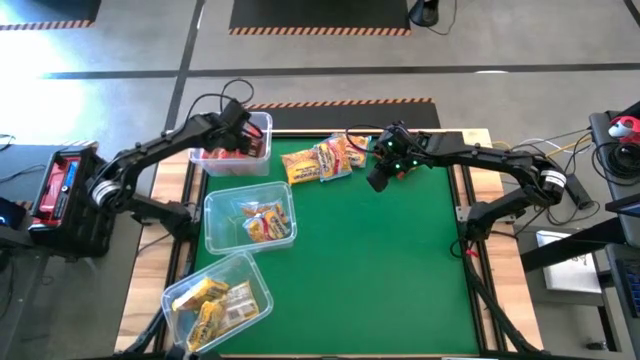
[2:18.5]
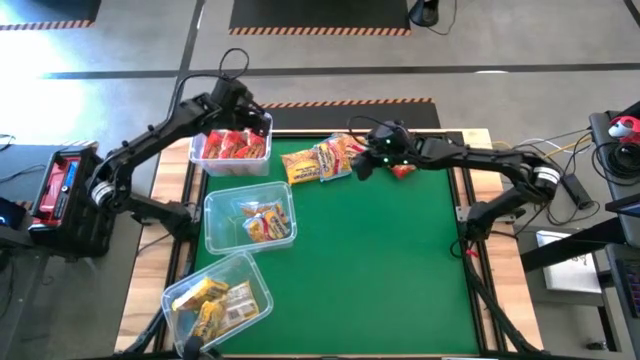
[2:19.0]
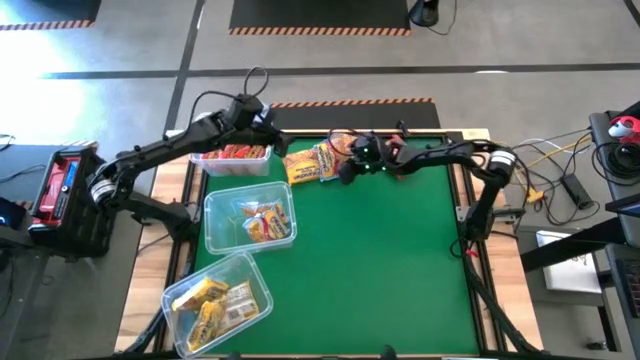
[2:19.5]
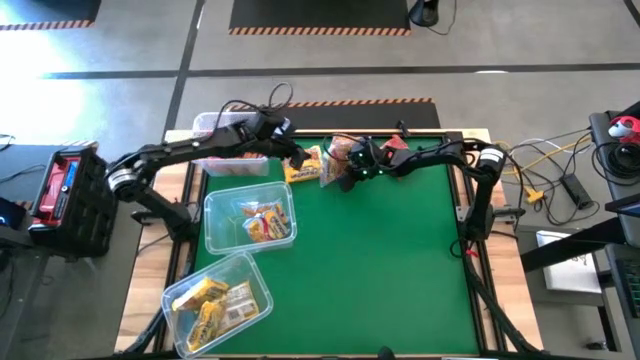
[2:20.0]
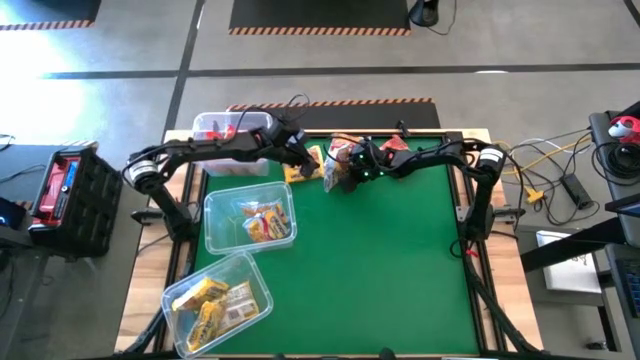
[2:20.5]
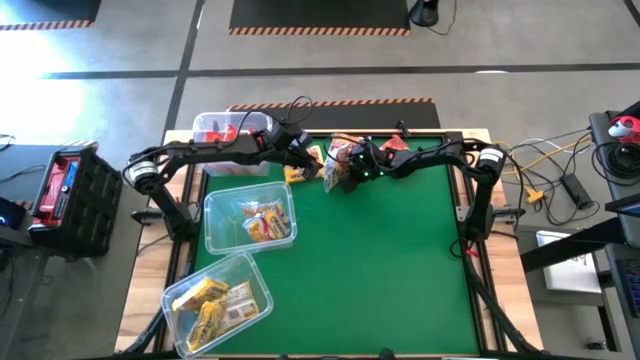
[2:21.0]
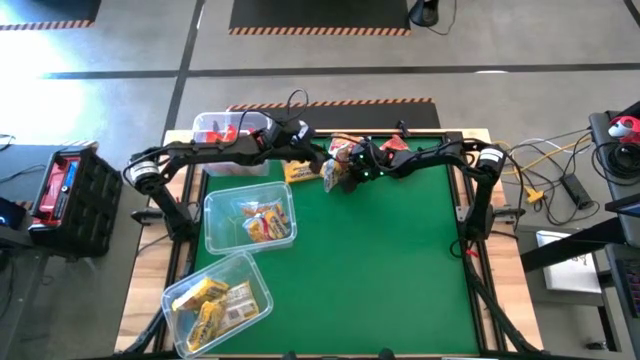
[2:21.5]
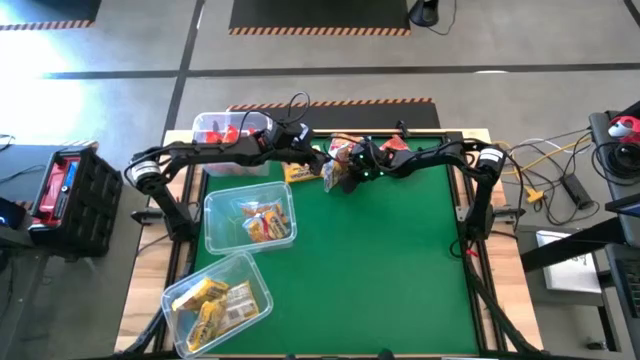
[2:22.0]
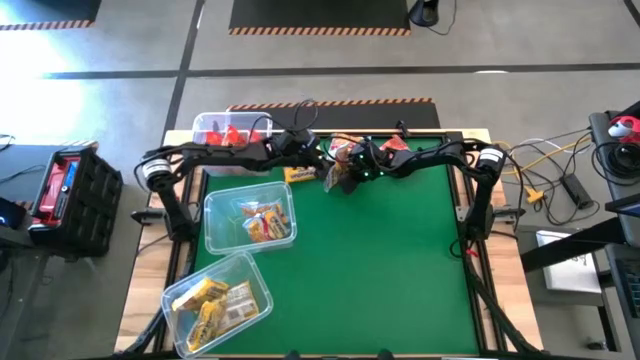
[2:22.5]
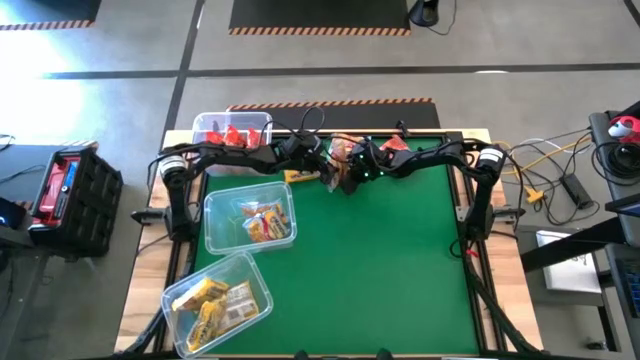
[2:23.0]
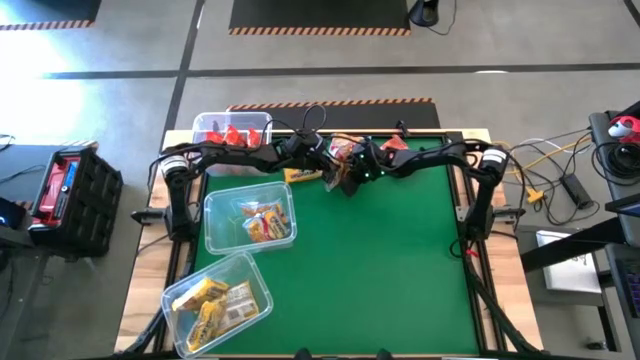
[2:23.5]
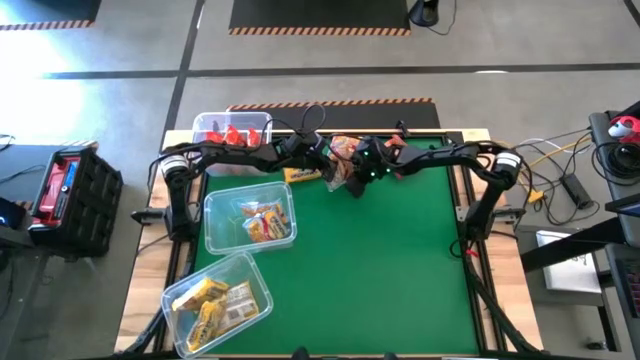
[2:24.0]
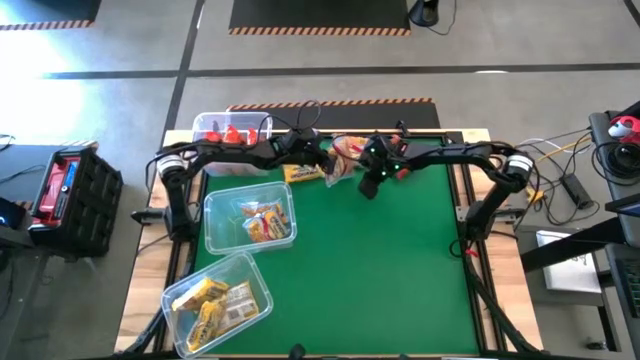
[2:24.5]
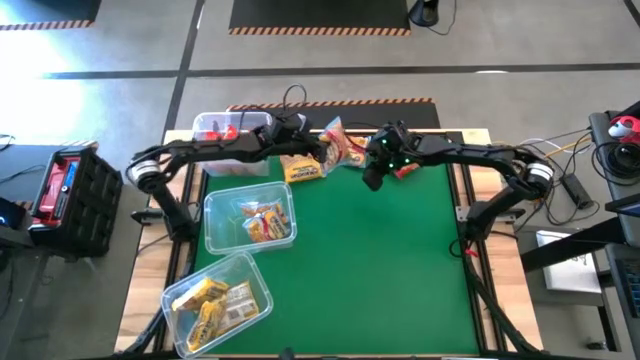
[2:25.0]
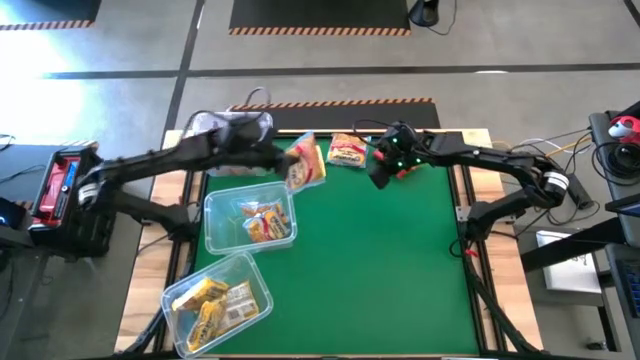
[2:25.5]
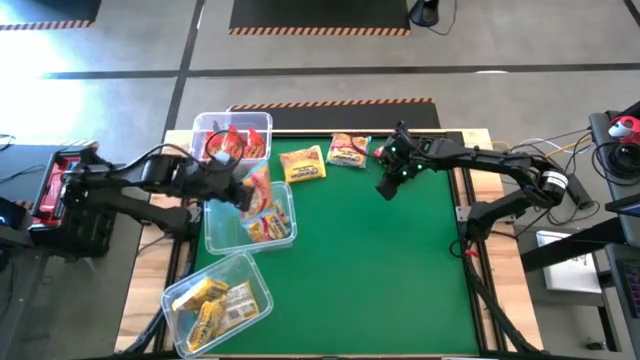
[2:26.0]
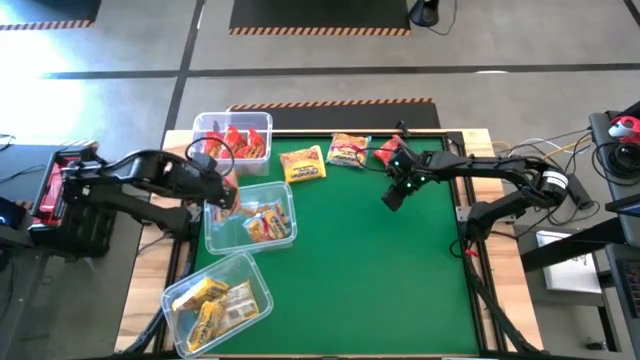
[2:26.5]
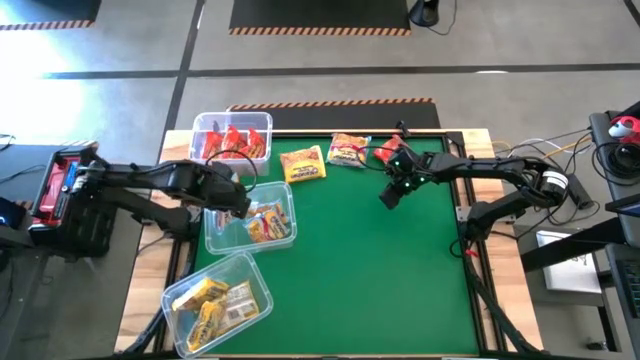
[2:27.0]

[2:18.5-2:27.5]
Task: Sort Maruchan noodles
Put the left blue noodle pack into the middle transparent bin

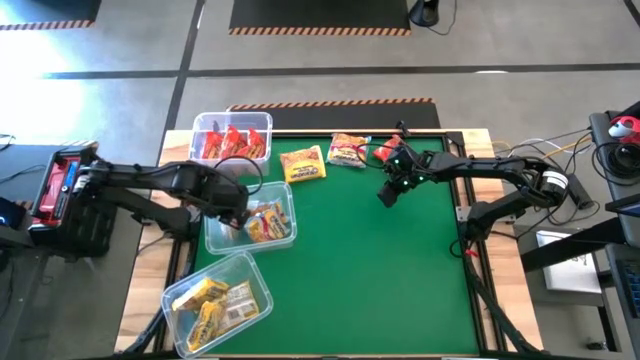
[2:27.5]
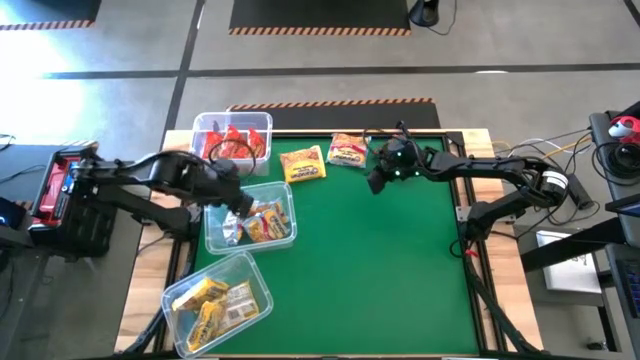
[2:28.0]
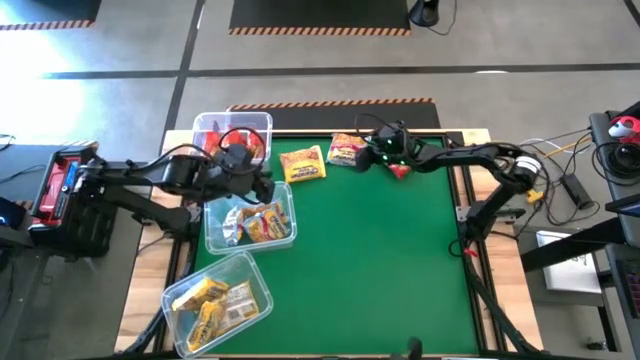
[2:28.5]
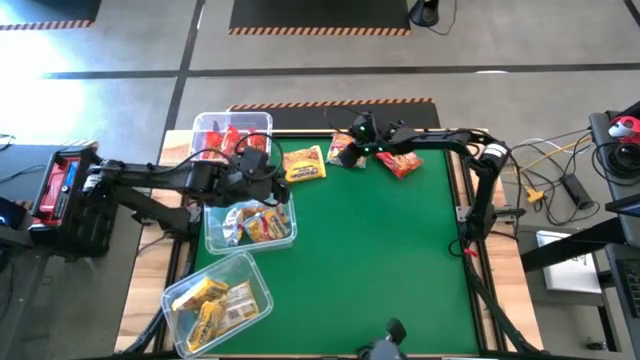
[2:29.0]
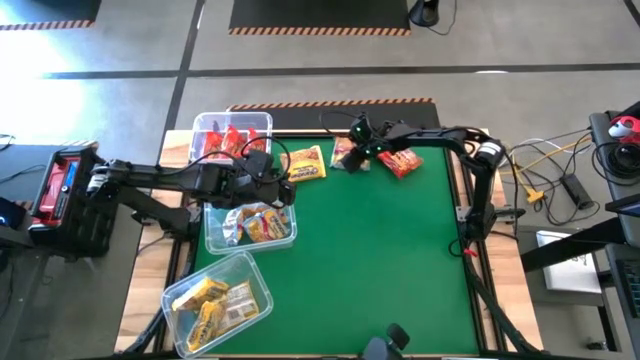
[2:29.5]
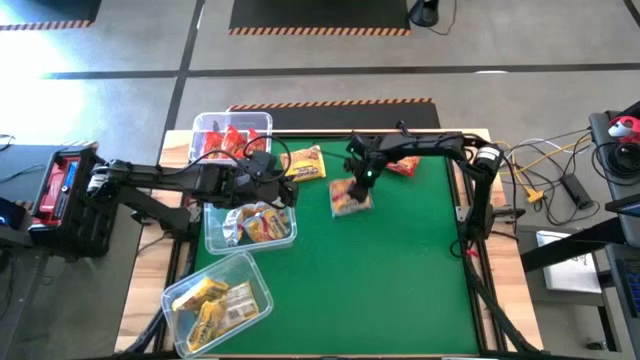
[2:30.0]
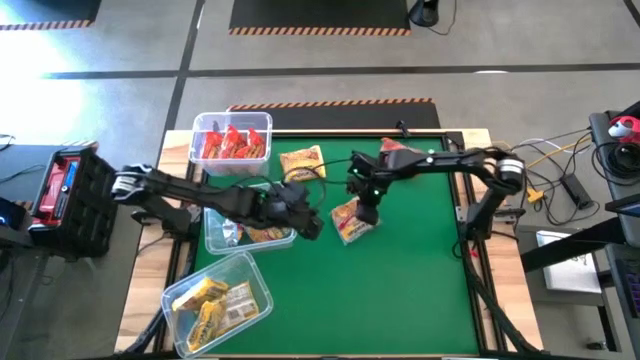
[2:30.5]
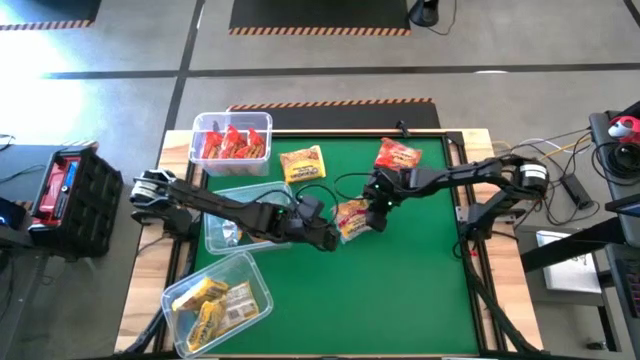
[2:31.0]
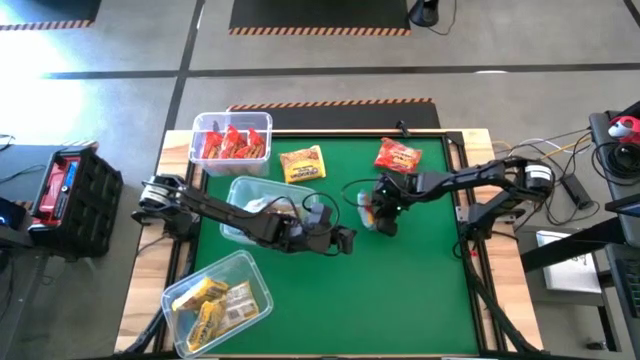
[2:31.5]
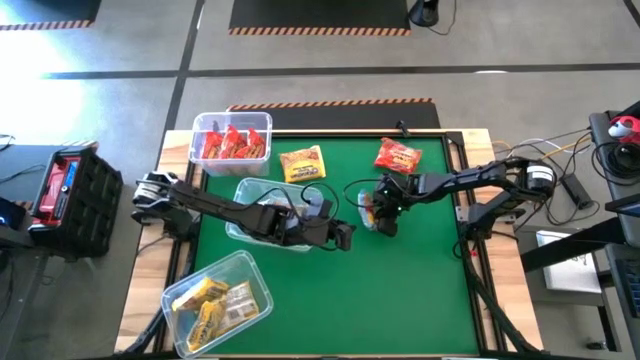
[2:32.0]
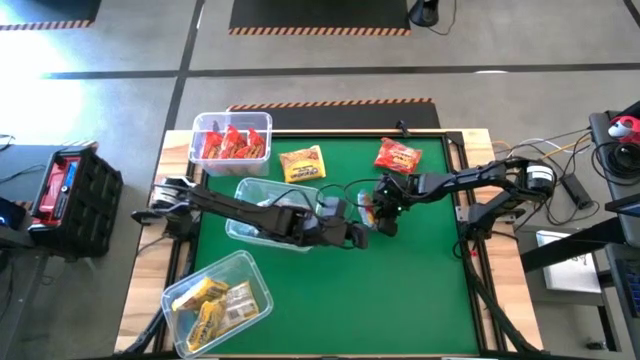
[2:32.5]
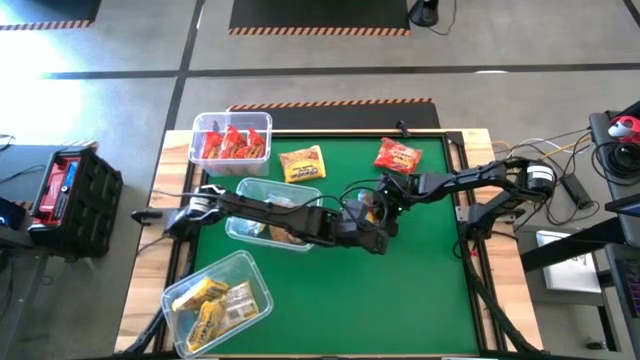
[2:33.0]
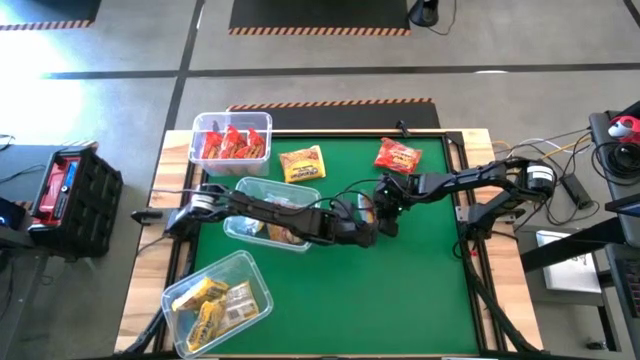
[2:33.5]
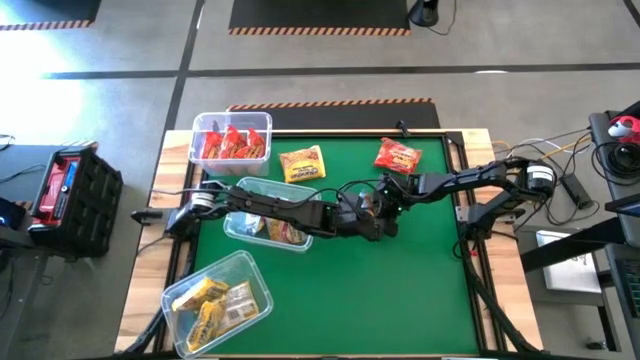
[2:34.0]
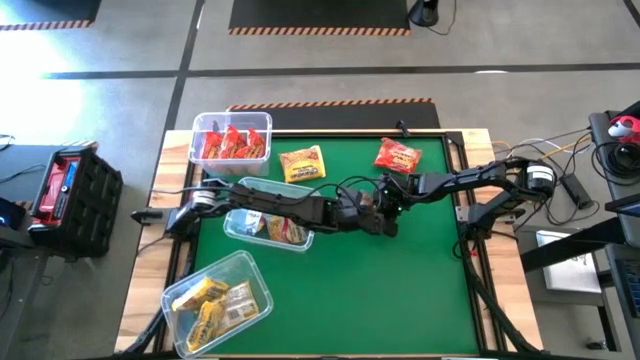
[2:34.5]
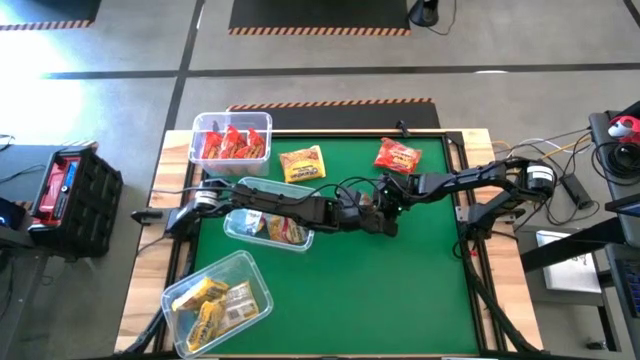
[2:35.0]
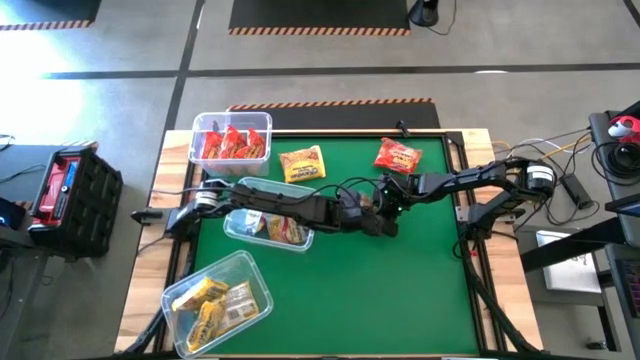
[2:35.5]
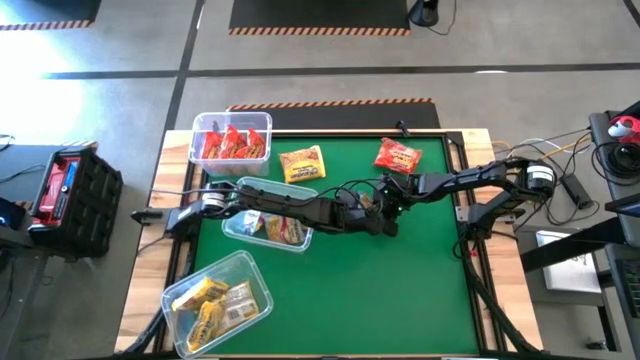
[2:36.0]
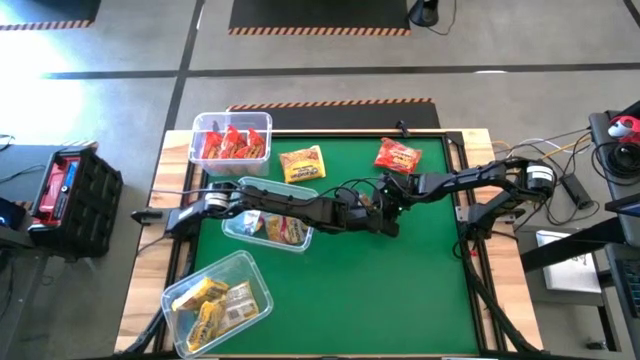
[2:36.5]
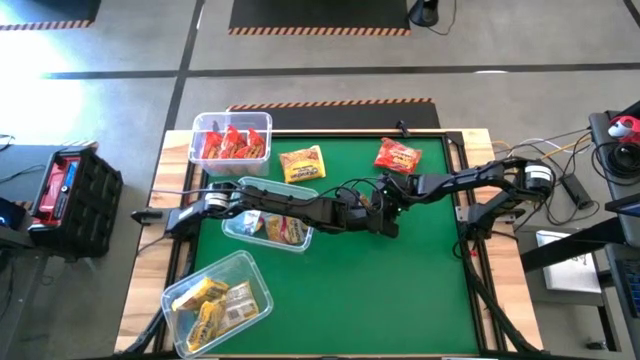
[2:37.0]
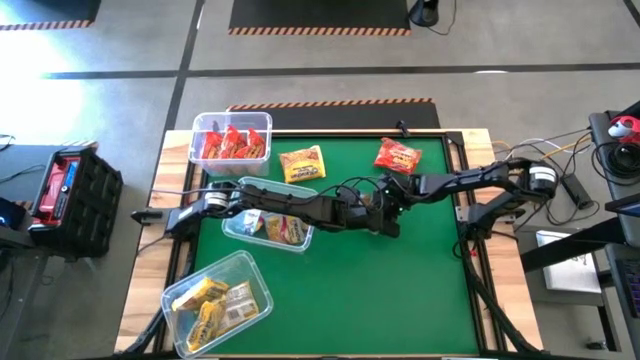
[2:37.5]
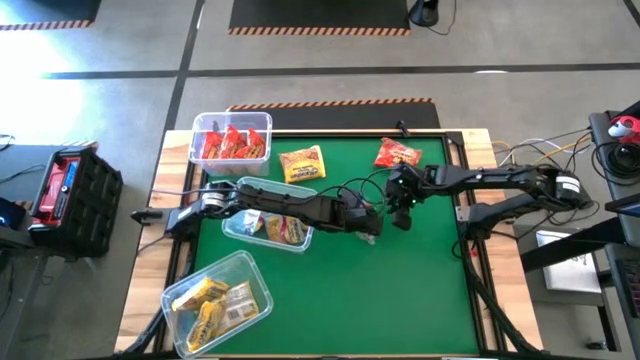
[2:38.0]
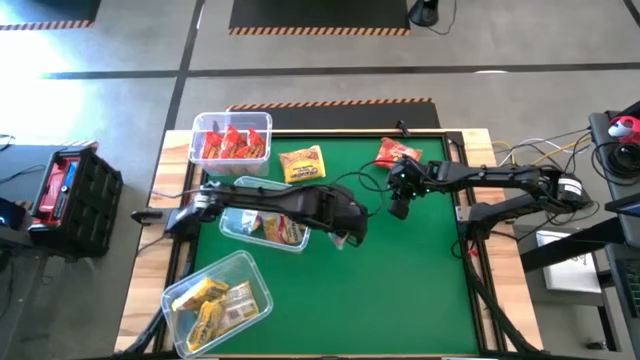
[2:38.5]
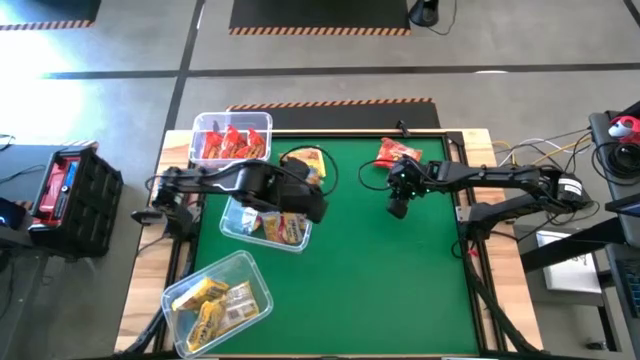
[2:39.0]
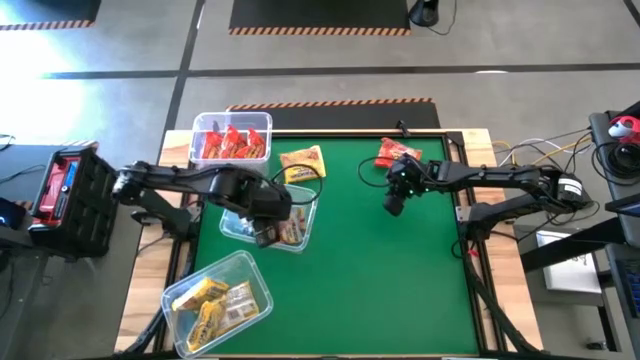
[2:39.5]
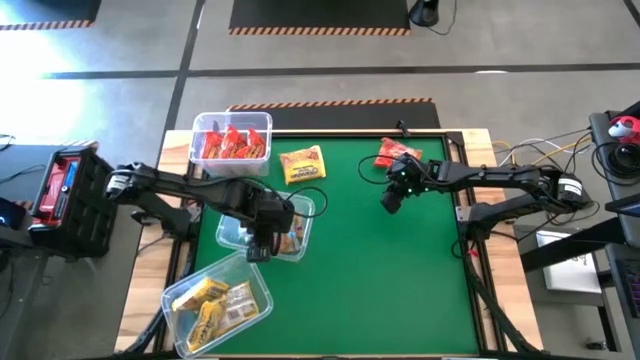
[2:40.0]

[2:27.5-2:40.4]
Put the blue noodle pack into the middle transparent bin

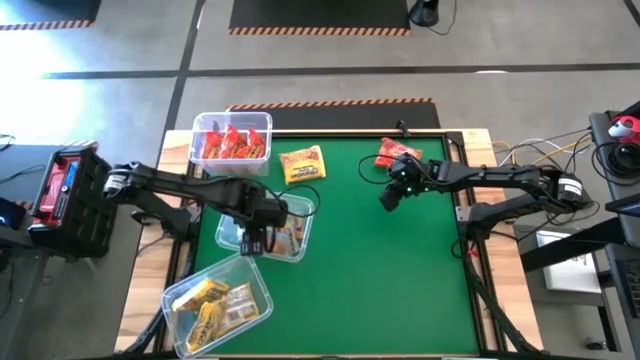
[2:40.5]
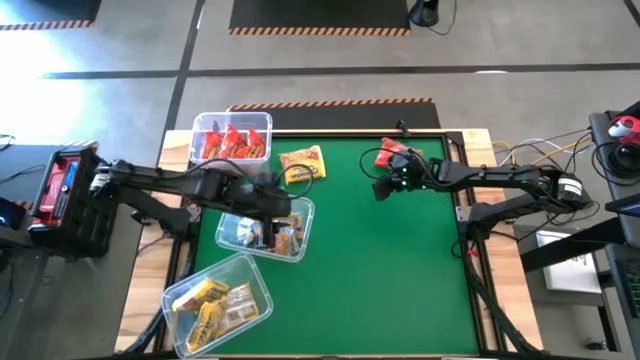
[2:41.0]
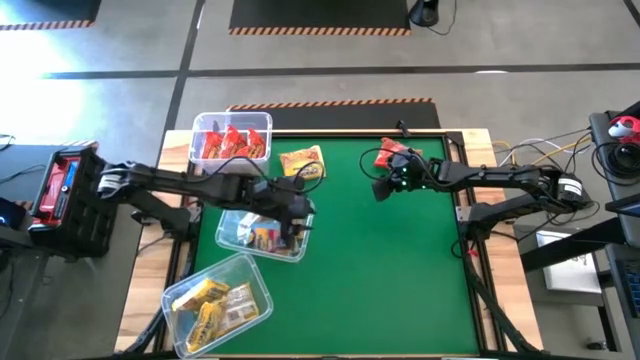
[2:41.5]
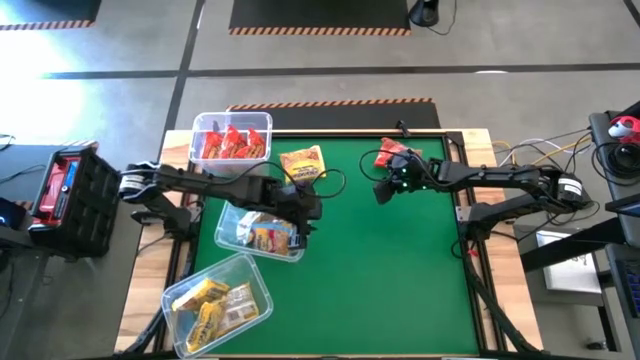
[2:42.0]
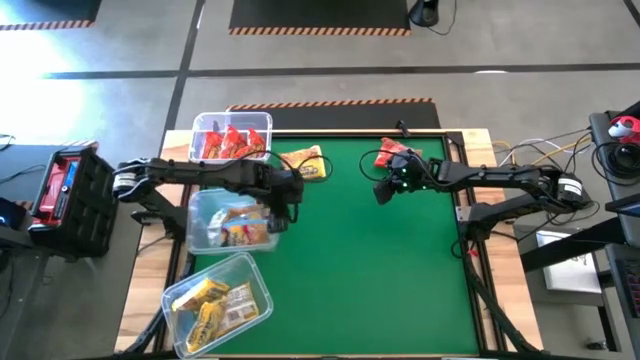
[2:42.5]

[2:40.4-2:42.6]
Adjust the middle transparent bin
